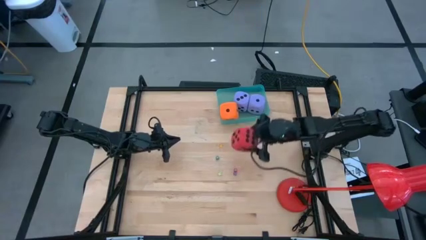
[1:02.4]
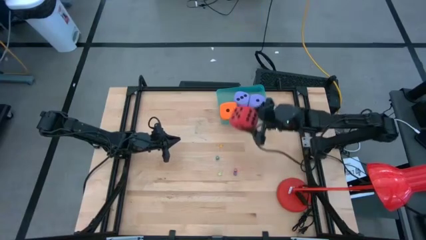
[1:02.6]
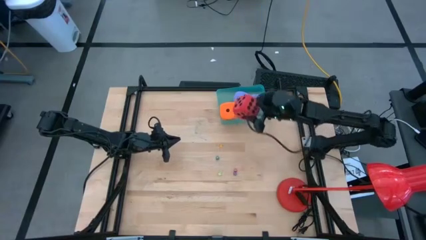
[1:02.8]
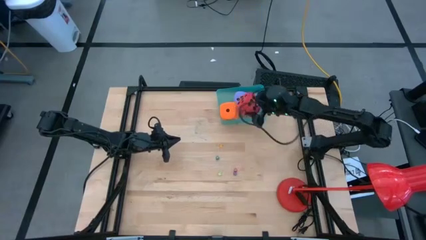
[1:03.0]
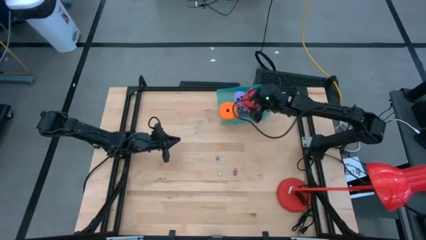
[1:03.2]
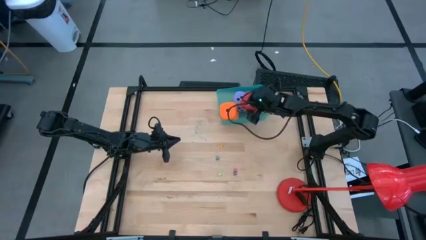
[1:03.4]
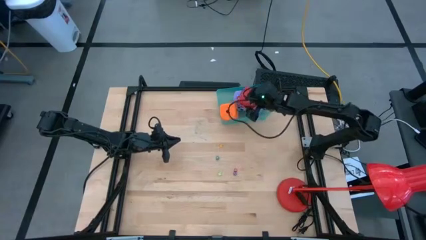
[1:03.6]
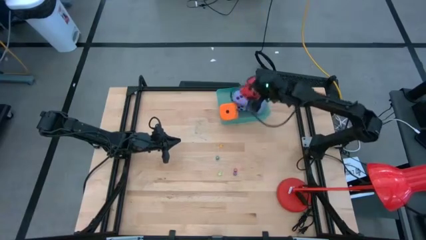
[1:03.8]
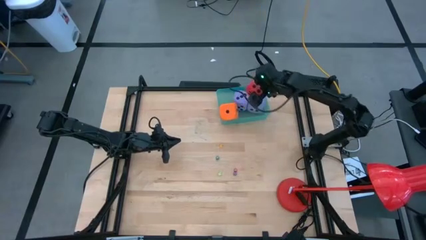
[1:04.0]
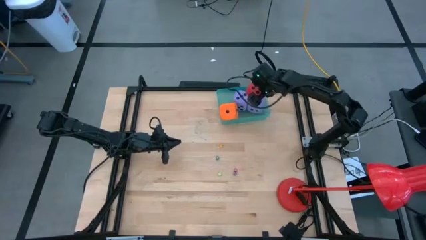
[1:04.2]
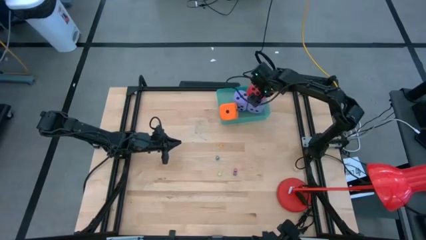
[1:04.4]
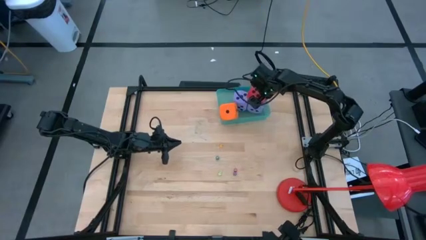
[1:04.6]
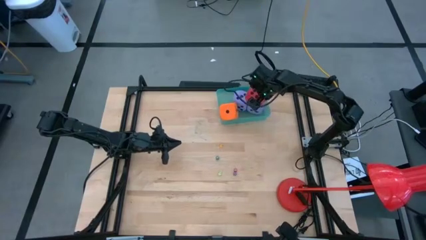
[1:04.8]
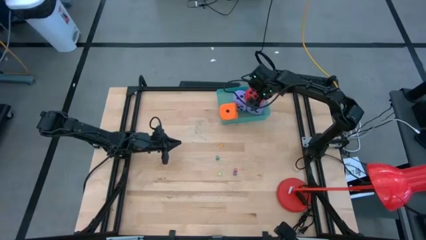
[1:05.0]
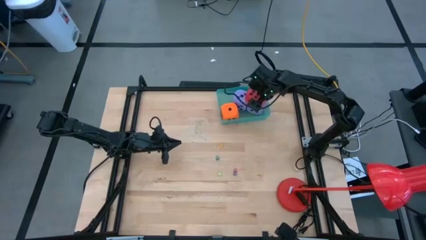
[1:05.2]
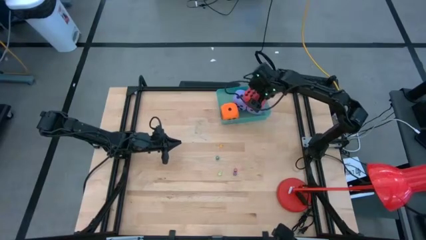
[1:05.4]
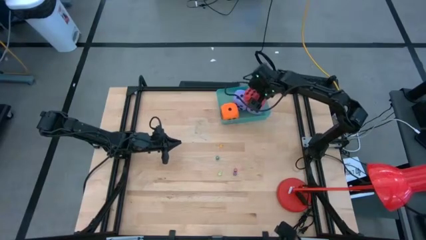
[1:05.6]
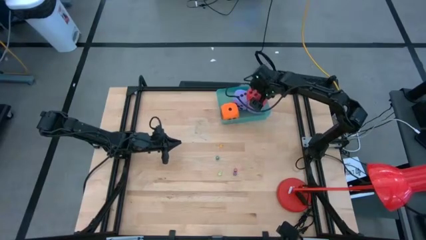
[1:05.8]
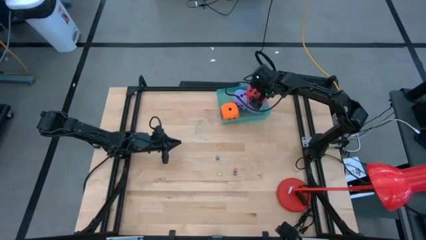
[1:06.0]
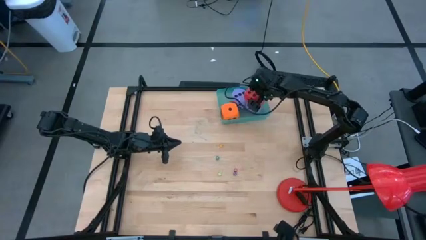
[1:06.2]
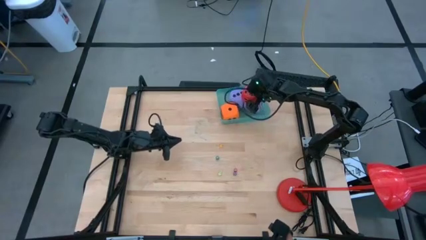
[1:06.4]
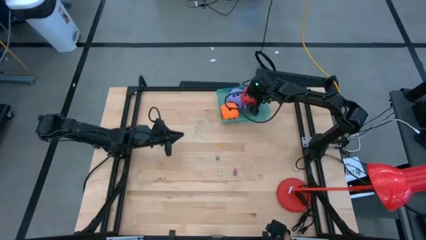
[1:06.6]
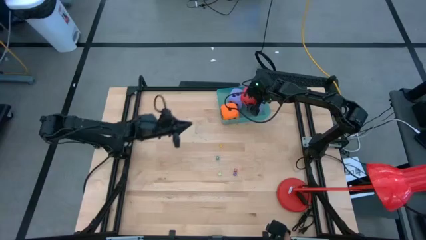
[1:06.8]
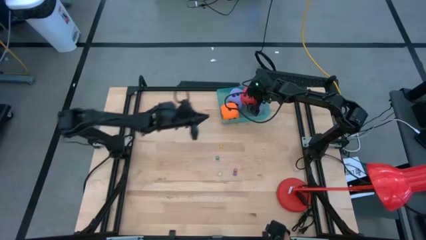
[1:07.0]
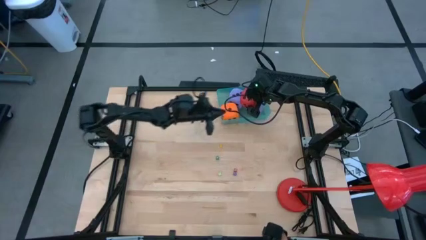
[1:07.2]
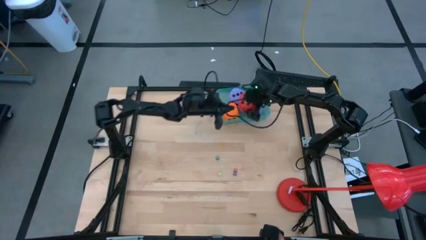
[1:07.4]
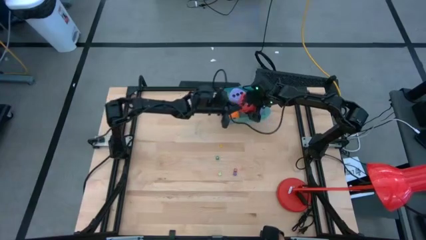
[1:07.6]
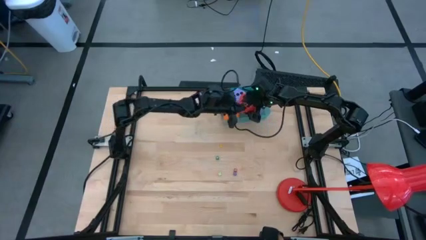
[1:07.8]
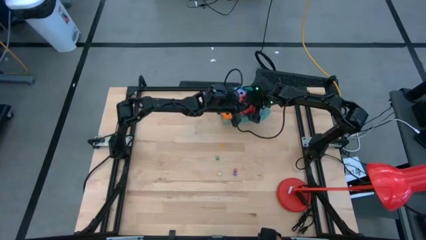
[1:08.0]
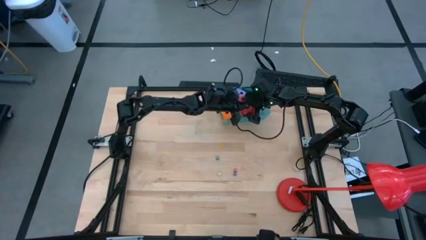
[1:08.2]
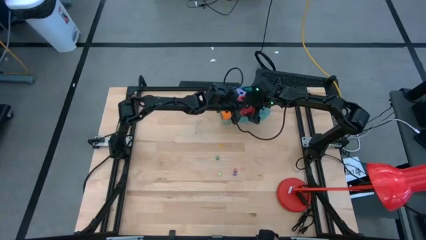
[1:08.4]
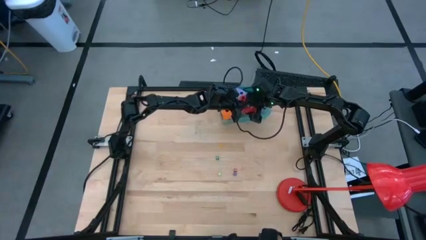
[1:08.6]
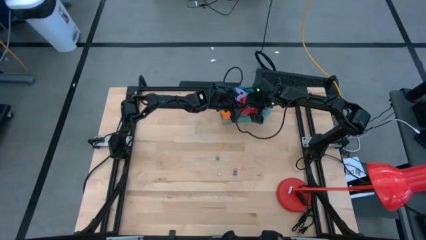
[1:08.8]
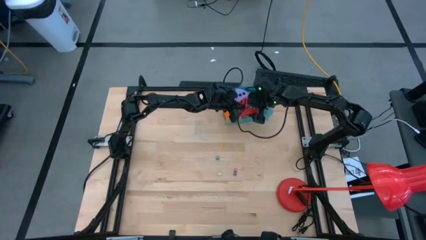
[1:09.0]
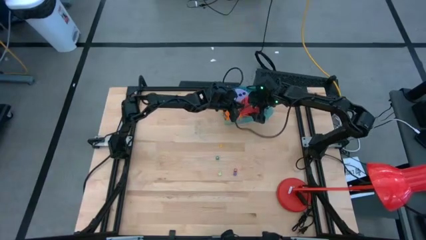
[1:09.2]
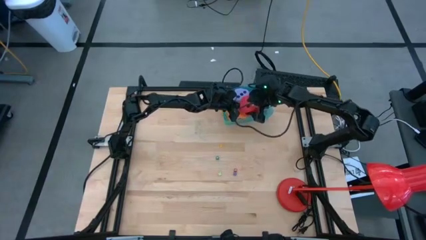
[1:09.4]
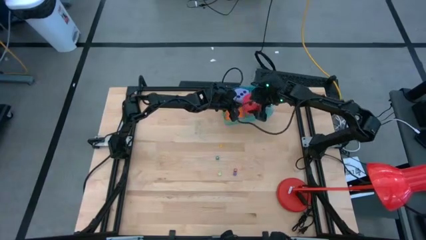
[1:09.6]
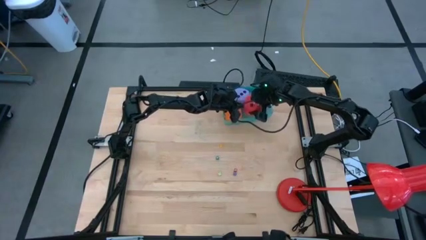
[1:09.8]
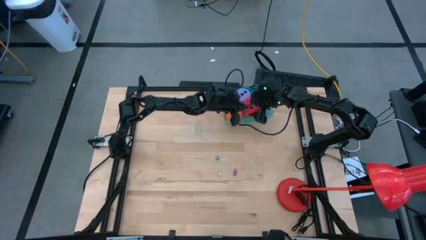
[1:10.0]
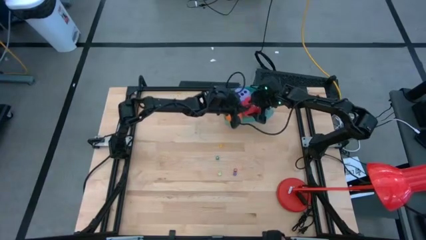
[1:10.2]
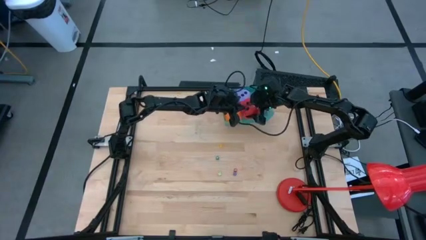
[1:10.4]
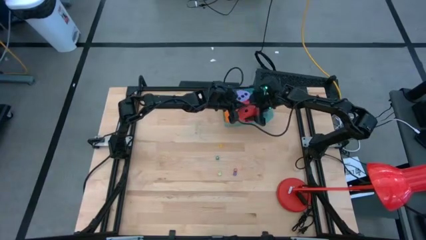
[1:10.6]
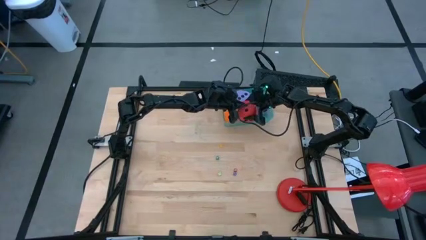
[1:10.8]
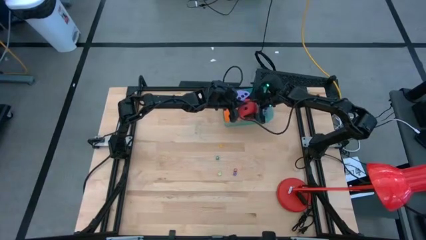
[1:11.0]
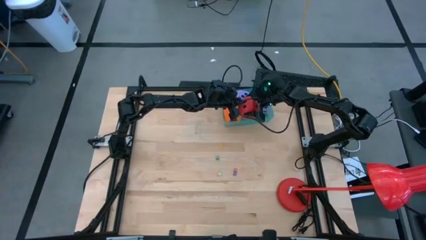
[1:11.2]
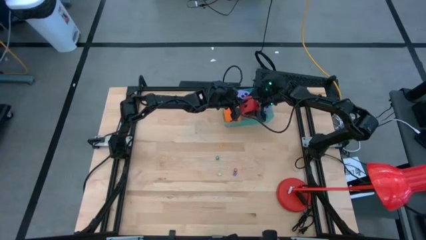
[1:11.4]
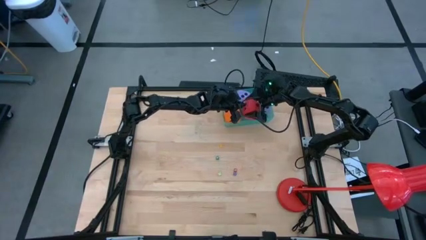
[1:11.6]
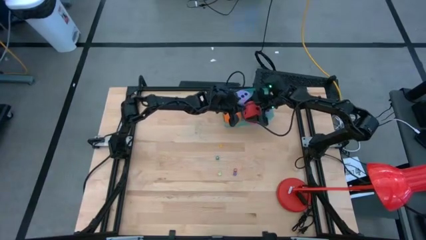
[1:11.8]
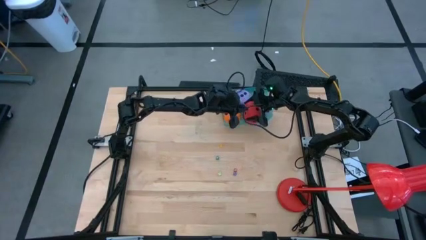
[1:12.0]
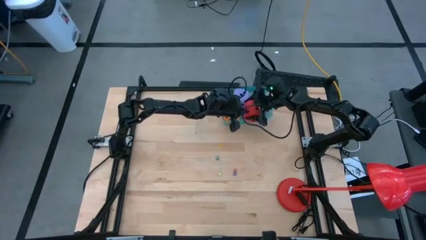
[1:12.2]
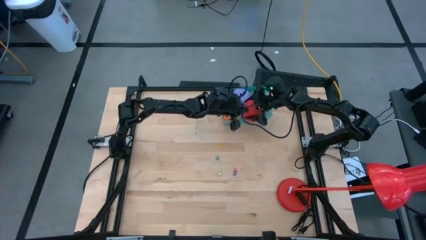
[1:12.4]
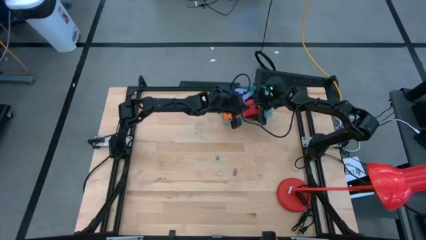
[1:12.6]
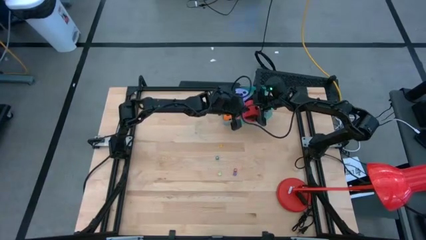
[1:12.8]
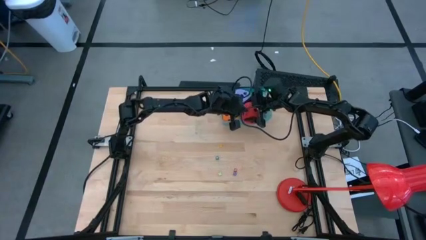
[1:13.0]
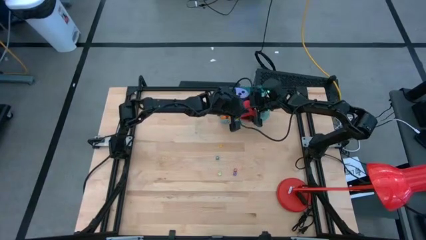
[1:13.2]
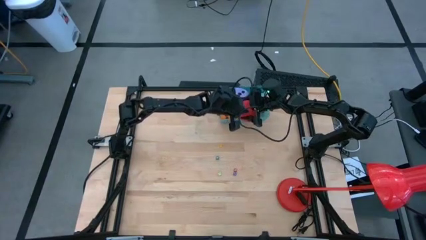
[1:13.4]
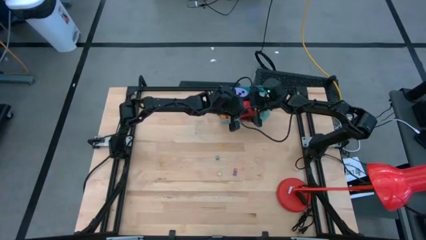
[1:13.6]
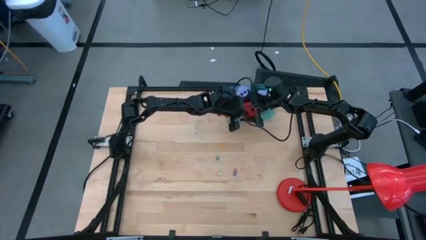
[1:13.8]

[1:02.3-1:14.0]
Task: Pick & Place Dice
Put the large red dice into the blue transparent bin

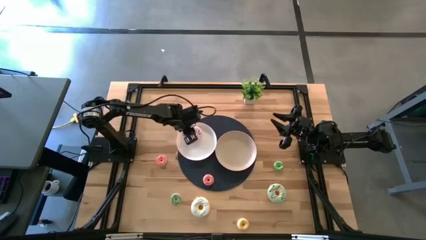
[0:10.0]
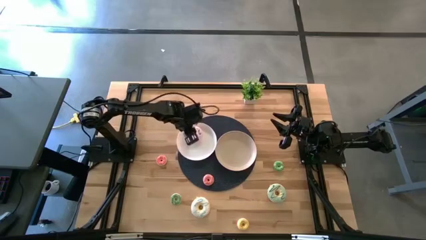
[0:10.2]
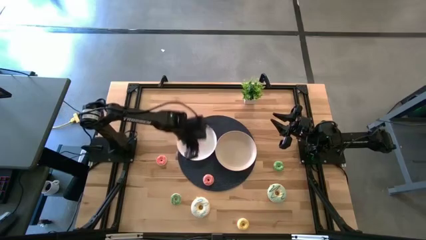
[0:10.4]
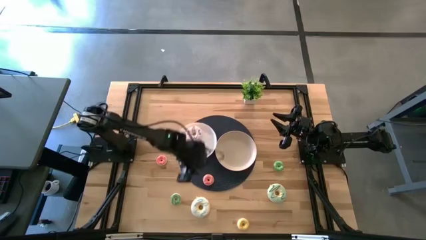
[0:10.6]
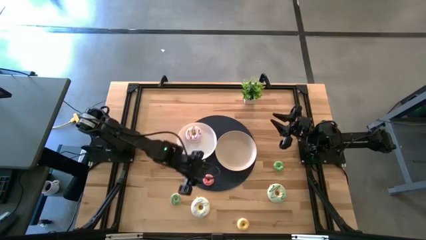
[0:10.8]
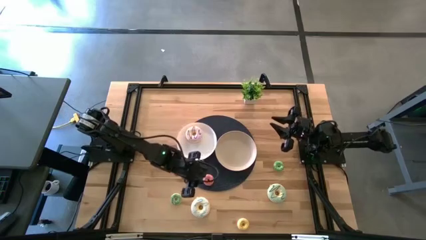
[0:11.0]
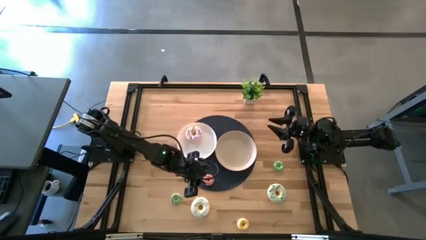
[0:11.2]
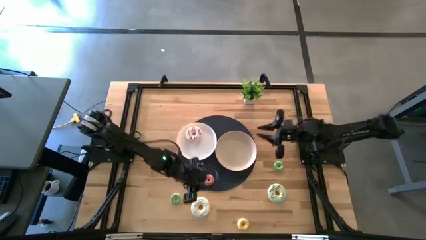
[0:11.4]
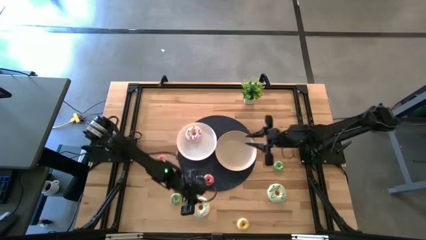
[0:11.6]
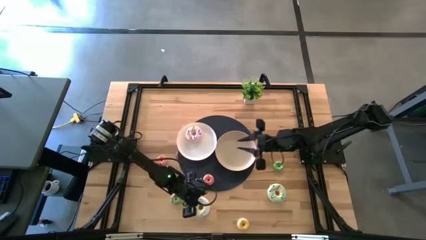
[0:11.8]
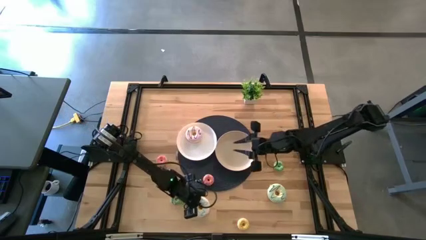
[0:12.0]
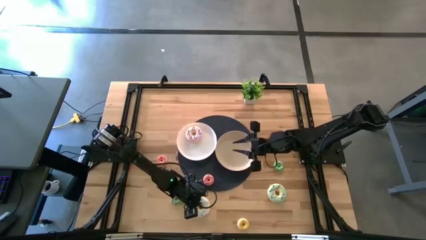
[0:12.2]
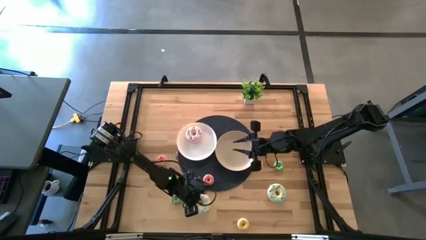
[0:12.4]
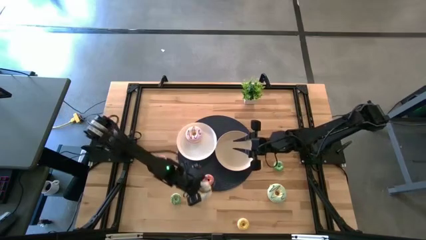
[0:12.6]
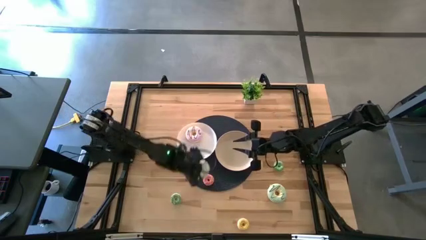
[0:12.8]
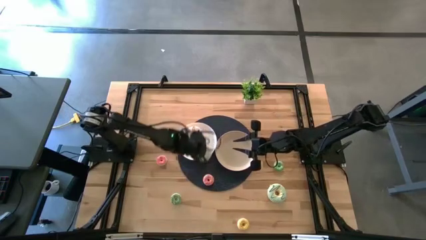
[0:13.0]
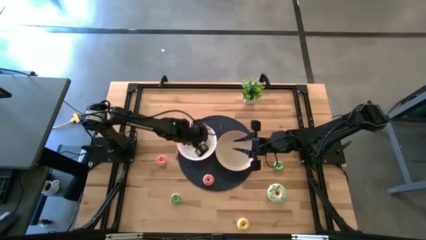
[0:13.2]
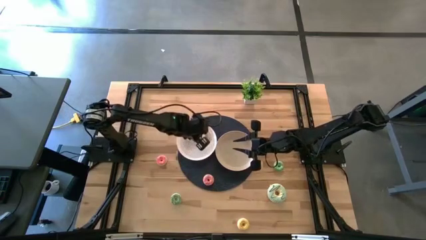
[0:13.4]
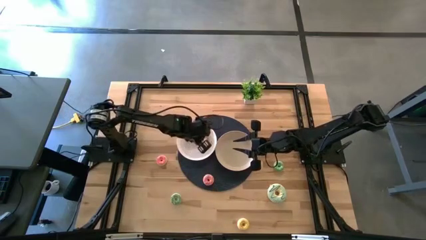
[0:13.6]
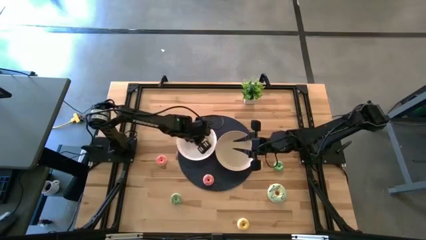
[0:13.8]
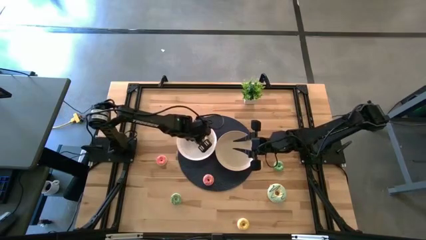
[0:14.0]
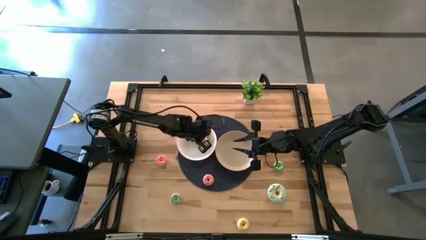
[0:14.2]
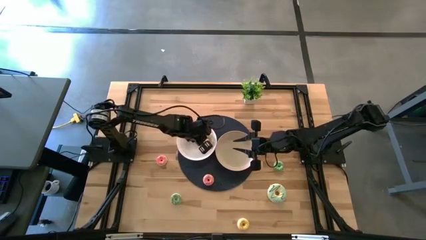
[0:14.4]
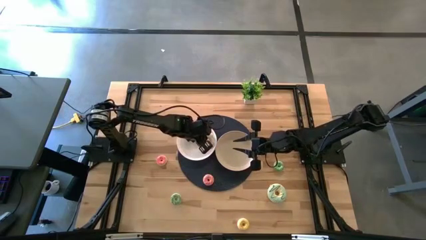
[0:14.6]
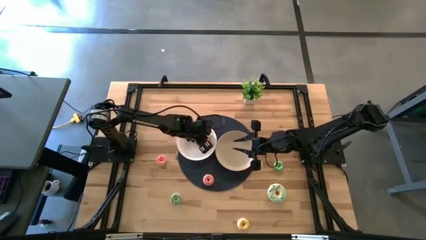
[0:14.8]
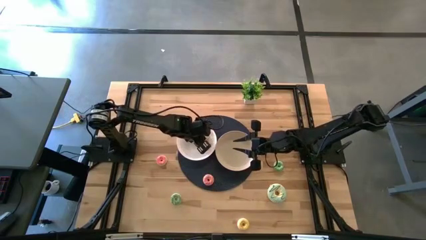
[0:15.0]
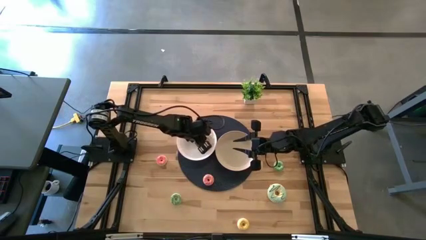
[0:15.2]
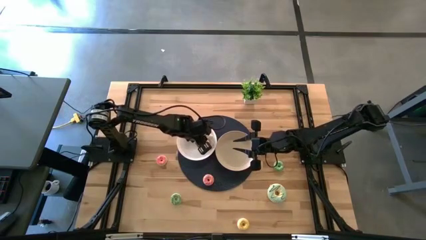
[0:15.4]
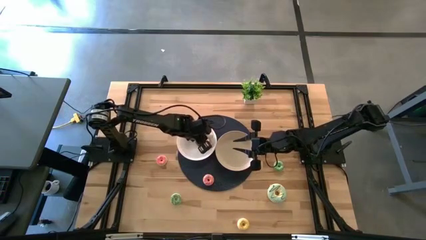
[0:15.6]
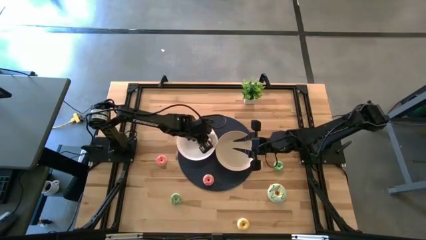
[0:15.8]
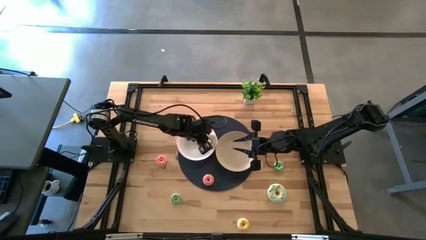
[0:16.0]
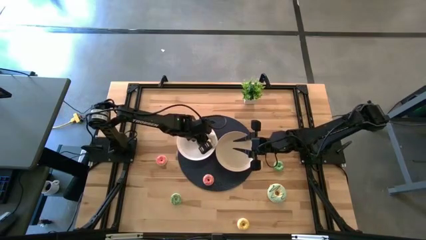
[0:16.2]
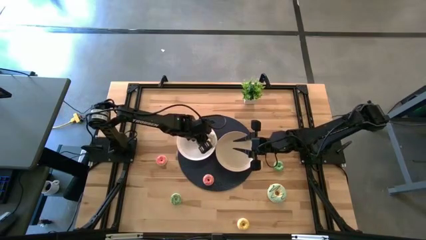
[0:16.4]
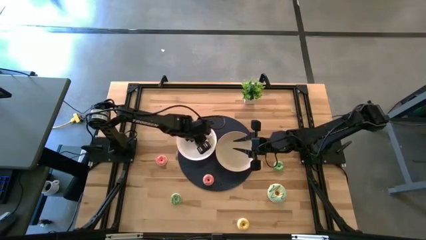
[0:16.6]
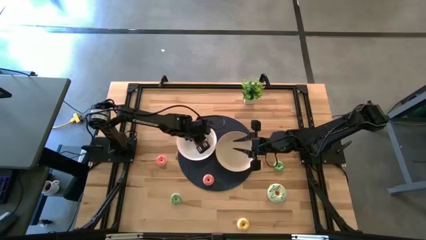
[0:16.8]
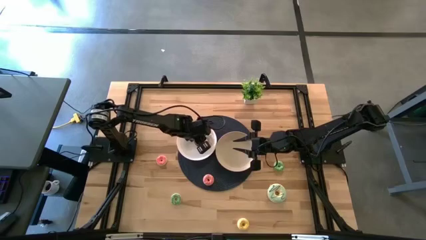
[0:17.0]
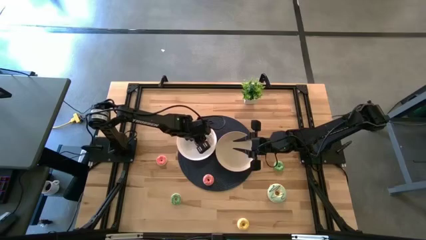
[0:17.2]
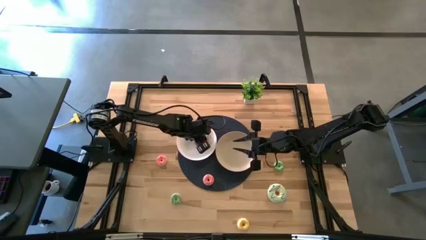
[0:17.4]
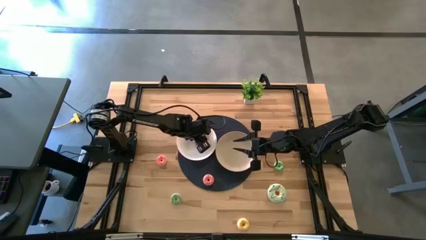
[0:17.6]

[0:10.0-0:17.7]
Task: Pick & Place donuts
Put the large white donut on the white plate
